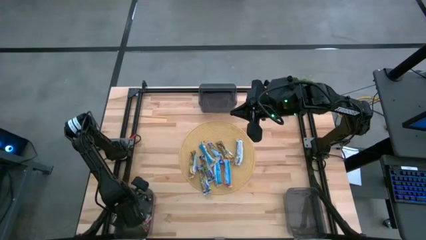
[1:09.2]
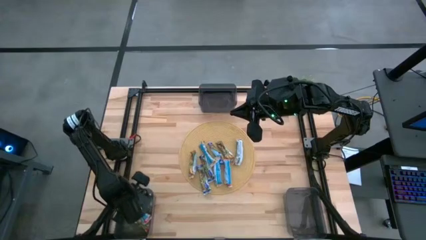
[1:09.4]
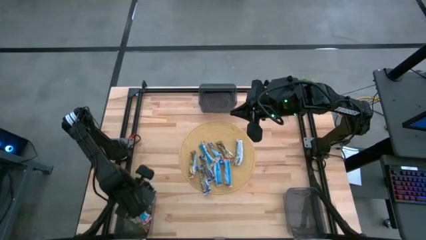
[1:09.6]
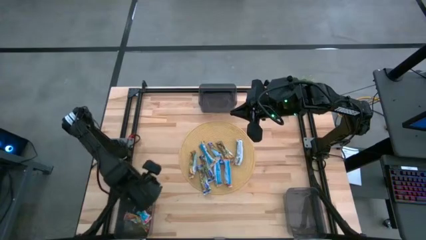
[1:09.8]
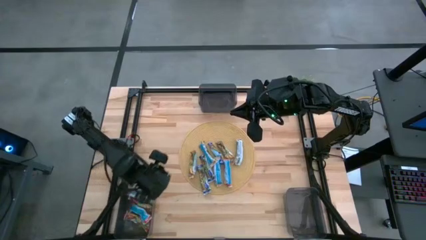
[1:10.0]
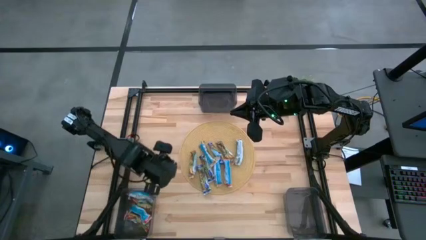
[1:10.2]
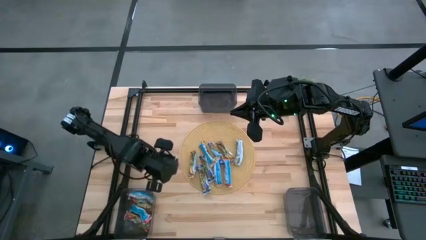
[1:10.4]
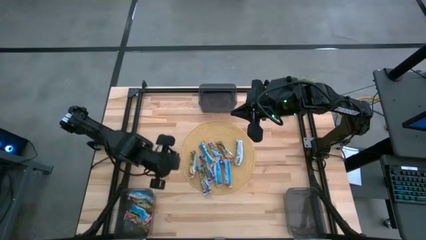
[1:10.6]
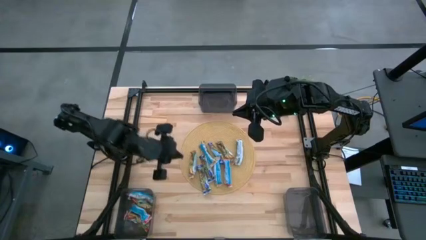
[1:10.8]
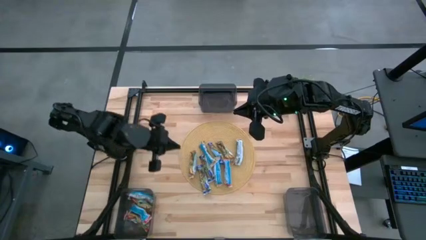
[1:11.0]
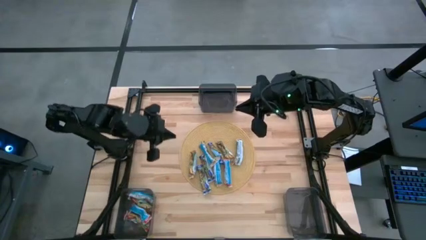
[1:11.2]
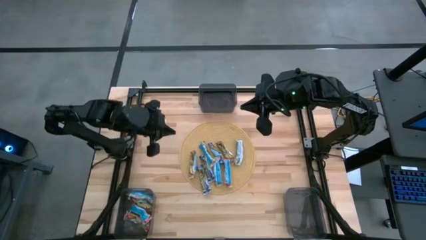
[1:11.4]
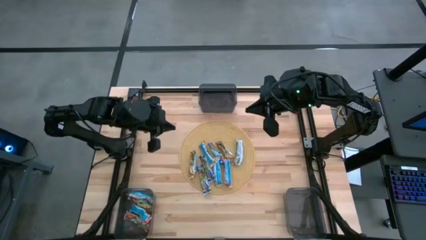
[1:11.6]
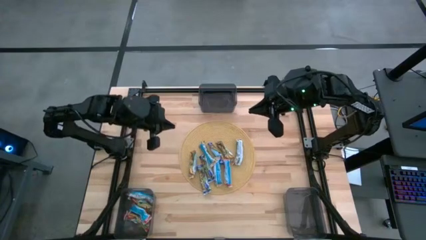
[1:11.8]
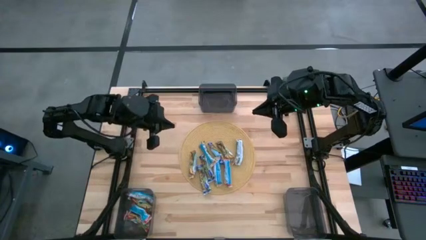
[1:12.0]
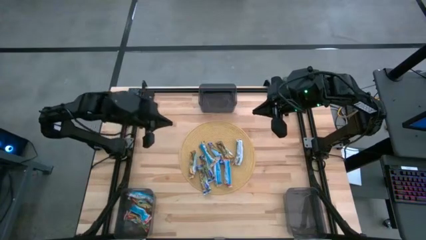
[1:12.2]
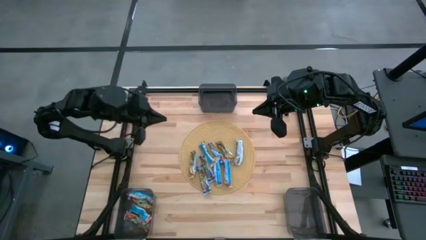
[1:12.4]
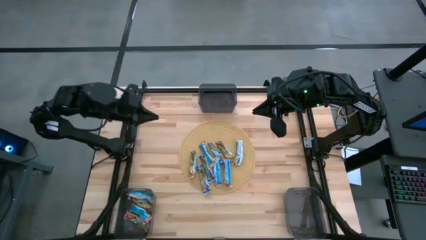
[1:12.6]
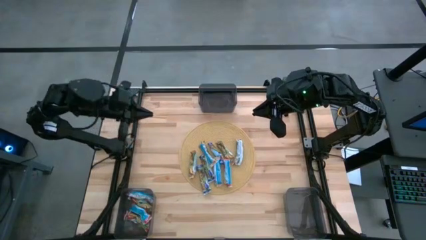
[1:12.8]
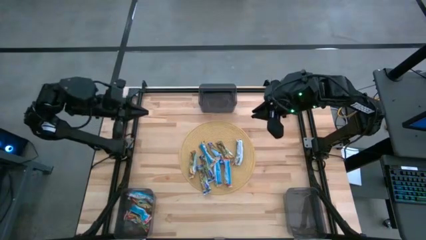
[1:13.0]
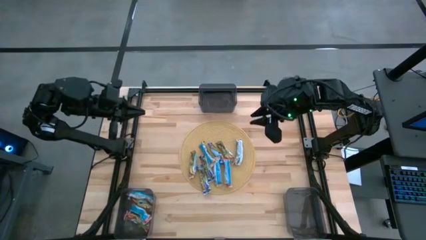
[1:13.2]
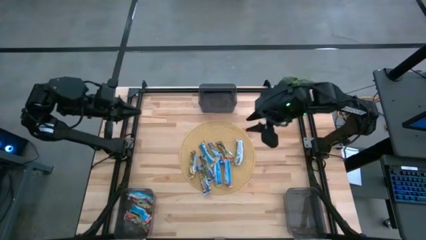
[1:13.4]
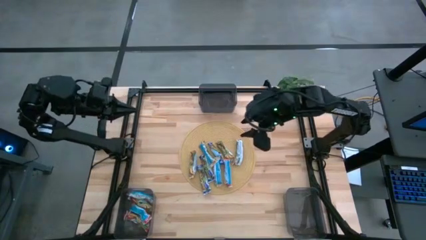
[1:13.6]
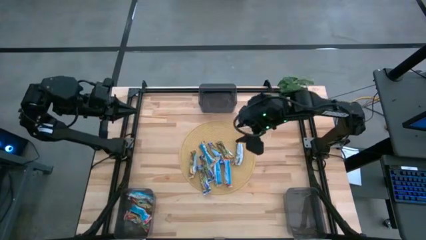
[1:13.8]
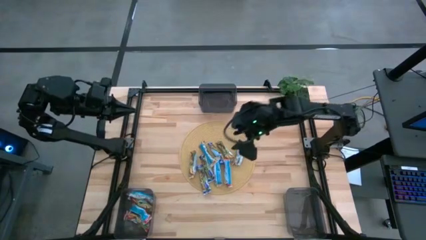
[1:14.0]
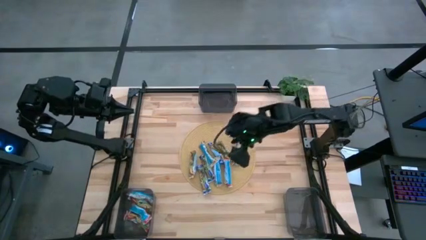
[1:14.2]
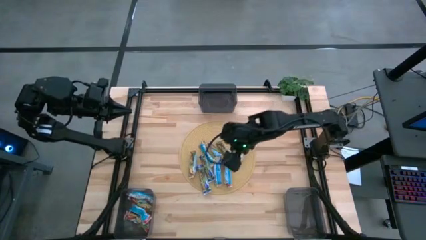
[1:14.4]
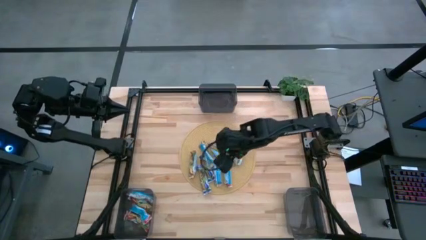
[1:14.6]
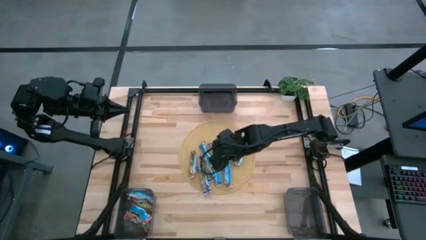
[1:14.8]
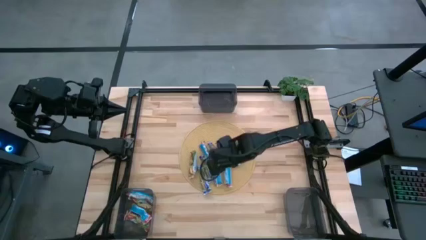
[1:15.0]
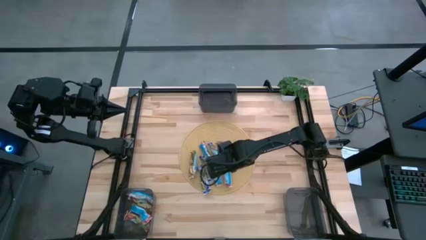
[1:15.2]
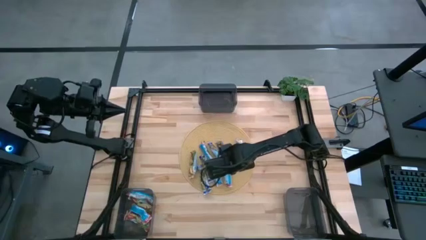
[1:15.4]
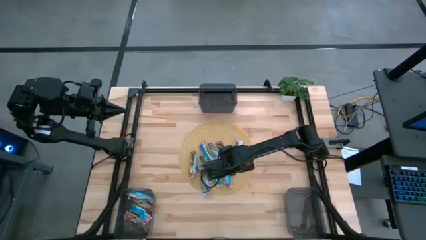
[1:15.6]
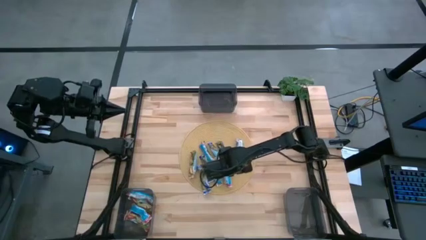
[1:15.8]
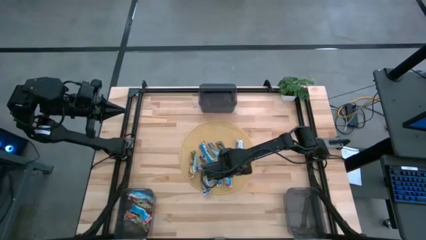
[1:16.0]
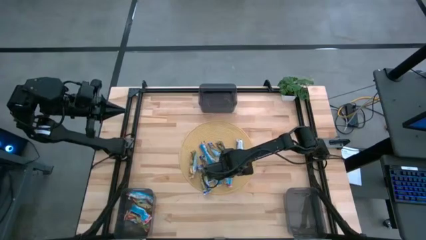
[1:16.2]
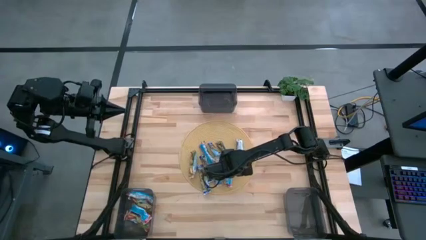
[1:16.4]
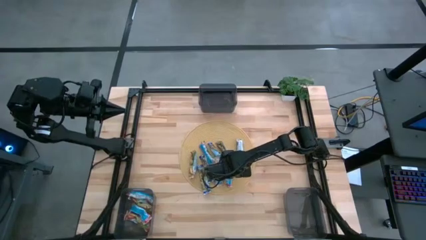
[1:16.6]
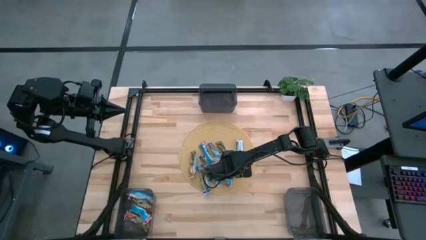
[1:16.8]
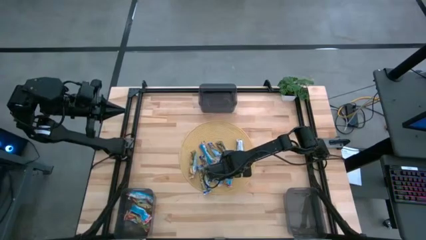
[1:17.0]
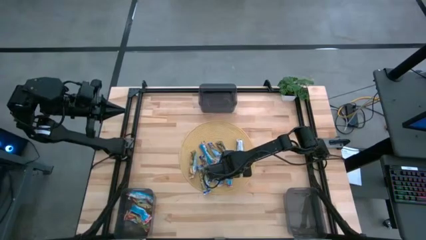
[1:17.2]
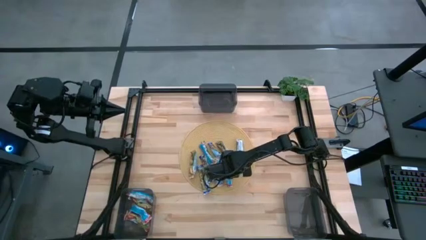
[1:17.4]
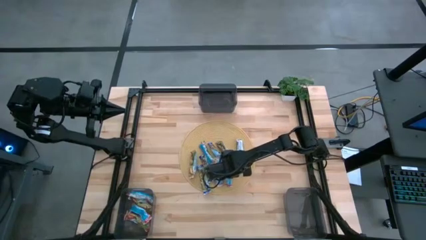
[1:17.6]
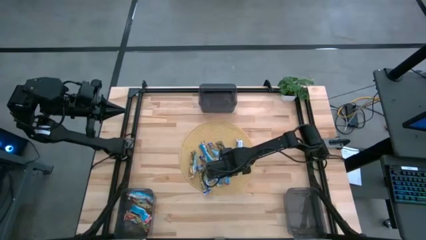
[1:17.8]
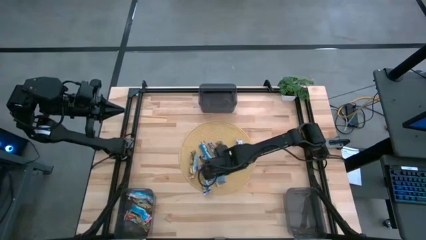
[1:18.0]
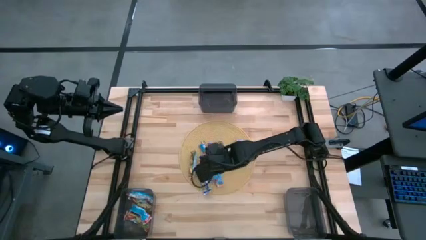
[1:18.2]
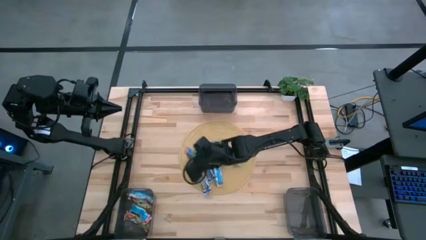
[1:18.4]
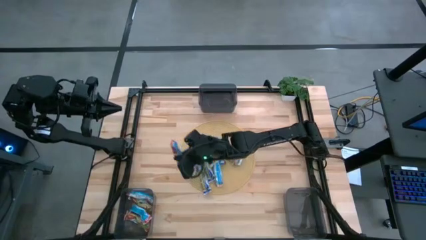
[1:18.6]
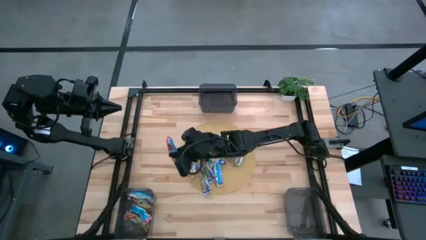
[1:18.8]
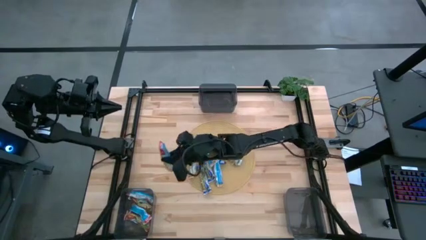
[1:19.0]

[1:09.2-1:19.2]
Task: Pick and place Granola Bars by type
Put the red granola bar into the left black bin

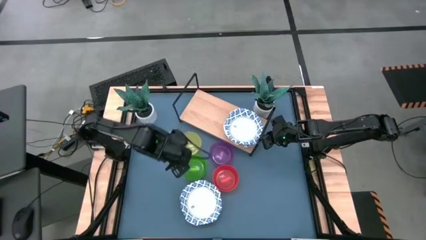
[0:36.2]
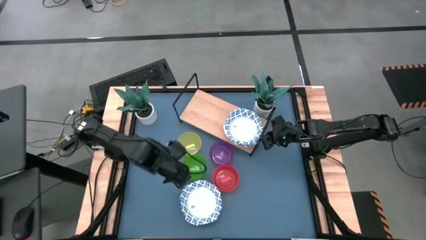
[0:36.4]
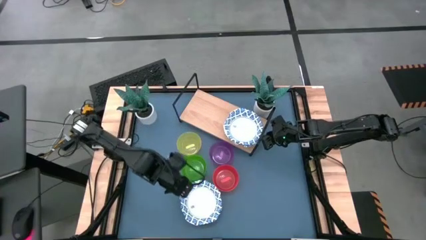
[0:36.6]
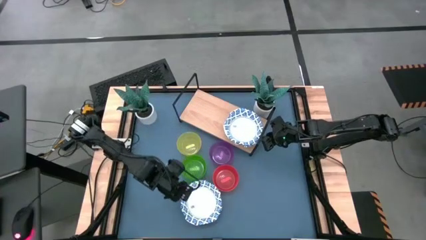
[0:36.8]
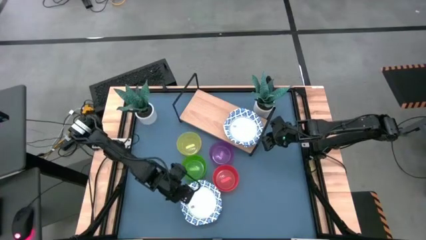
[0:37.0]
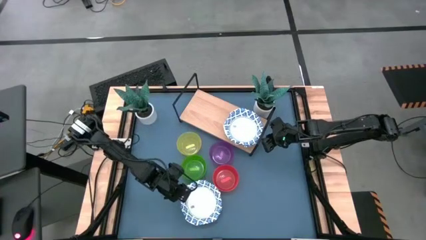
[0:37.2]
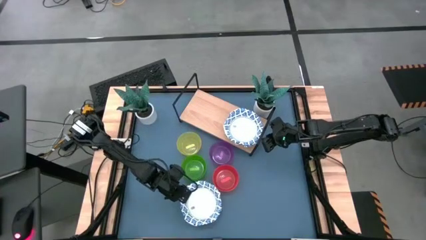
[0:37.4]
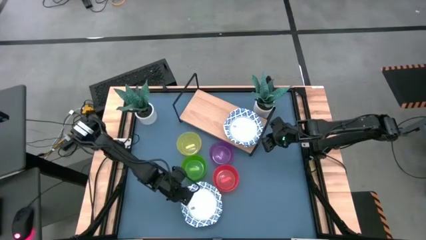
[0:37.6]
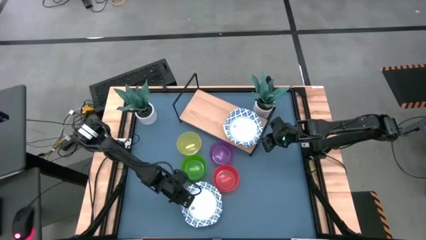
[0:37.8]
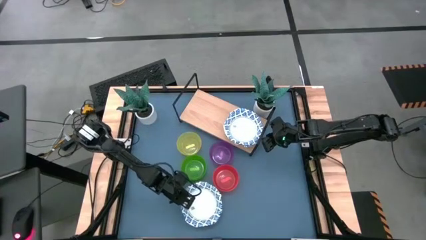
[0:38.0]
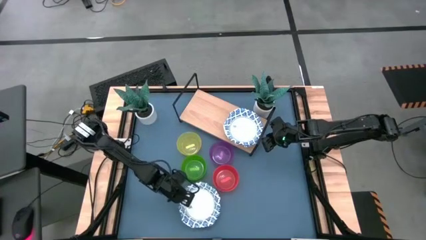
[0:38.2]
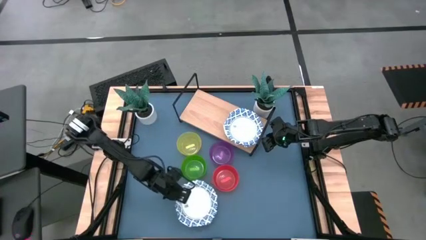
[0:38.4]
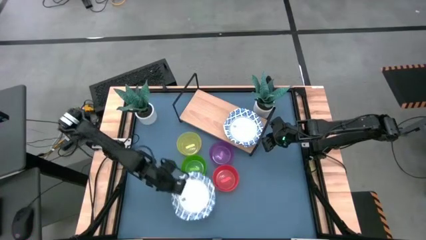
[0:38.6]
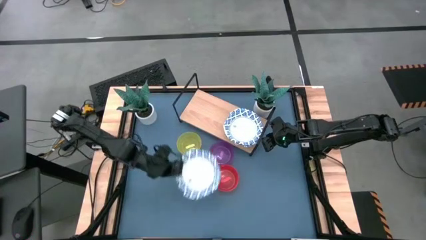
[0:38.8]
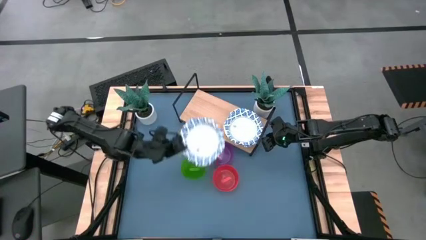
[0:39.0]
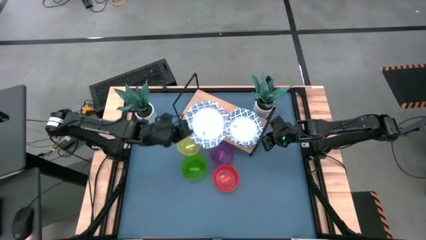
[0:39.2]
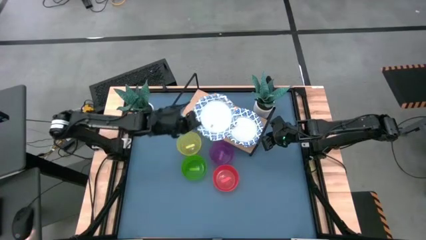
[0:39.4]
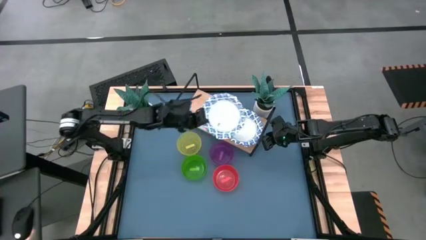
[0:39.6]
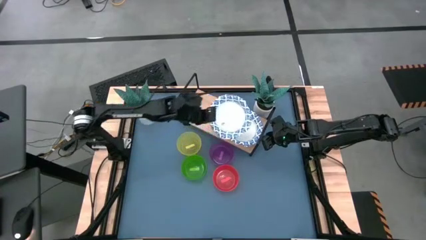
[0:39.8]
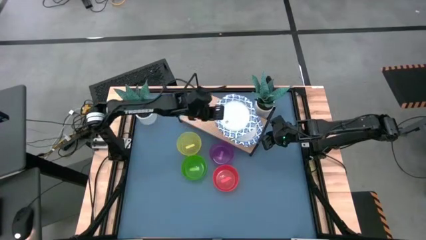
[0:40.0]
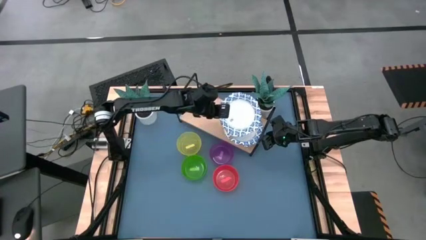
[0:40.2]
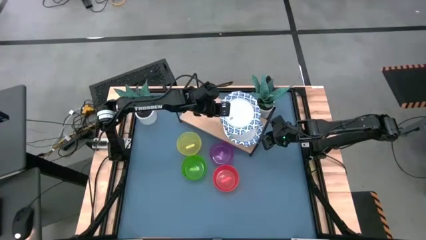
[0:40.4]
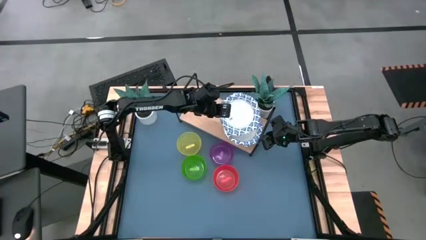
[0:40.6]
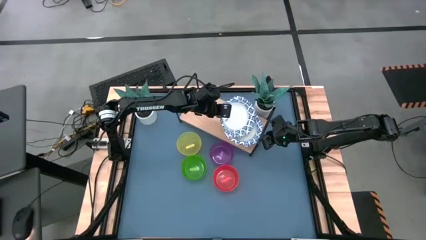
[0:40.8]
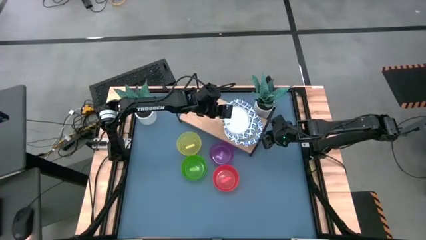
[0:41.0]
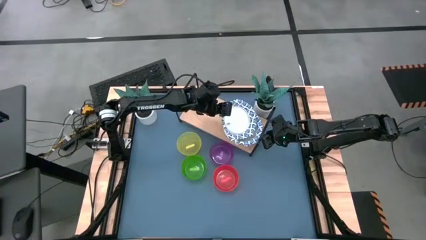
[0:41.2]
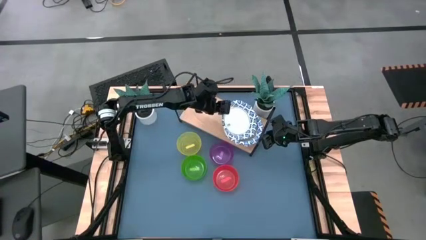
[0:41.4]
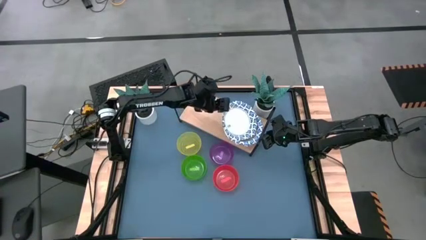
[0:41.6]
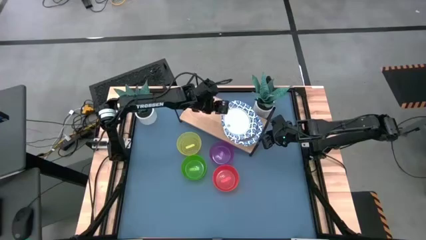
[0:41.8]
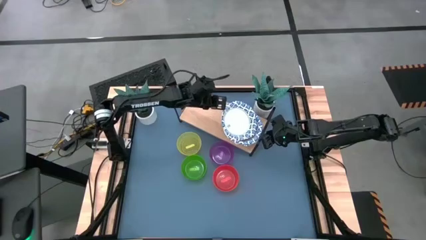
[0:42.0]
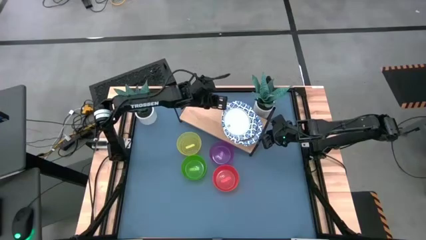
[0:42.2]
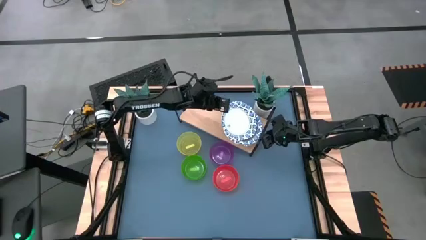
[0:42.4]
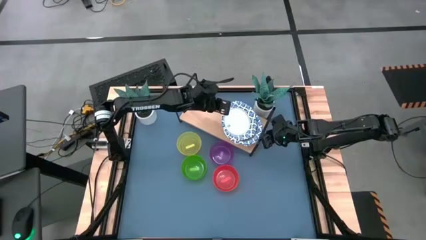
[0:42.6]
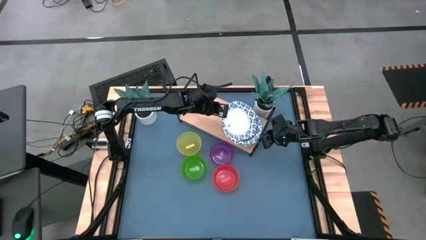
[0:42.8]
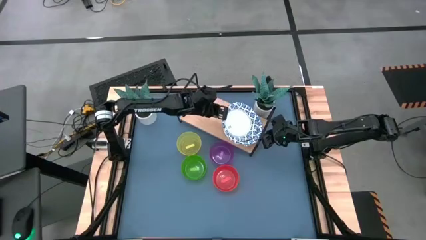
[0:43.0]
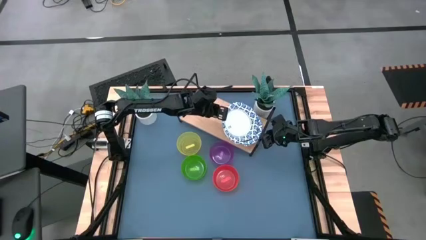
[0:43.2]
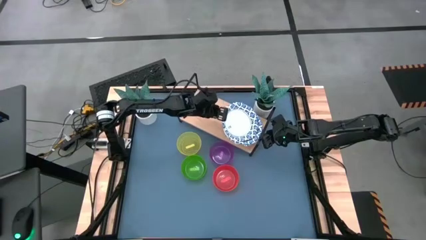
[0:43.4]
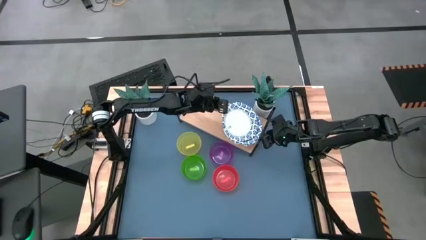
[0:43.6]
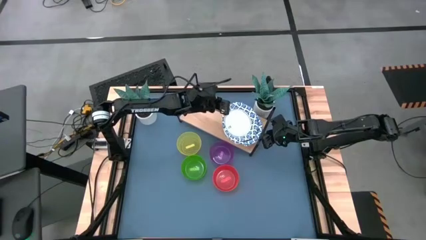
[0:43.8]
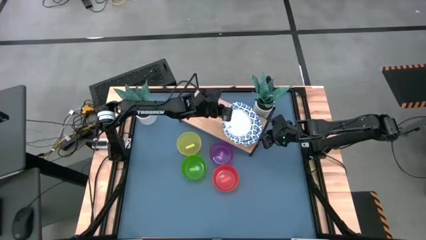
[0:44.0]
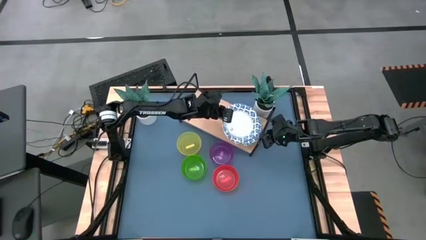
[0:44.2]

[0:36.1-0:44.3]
Task: Place and stack bowls onto a shelf
Stack blue pattern plate on top of the blue pattern plate on the shelf
